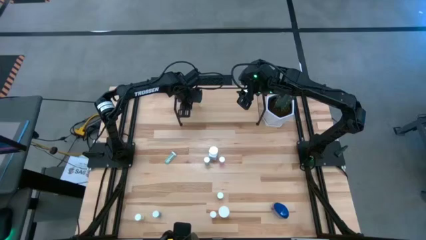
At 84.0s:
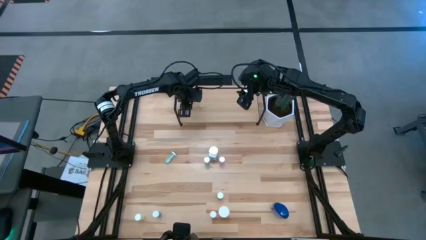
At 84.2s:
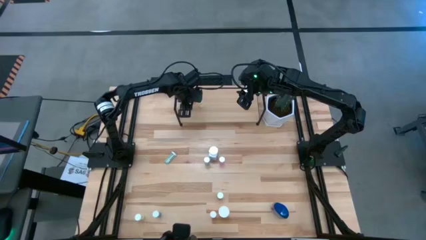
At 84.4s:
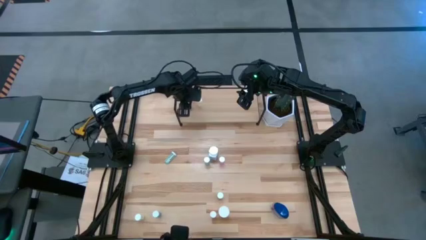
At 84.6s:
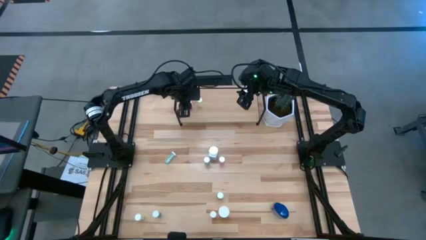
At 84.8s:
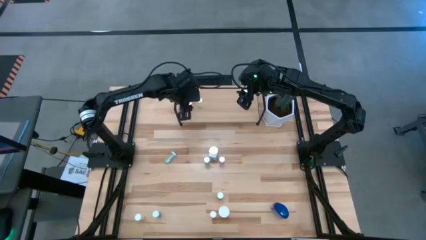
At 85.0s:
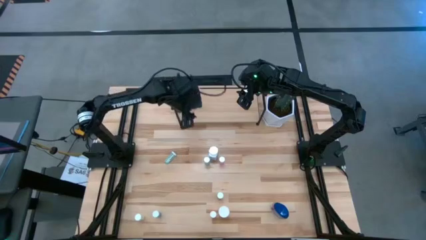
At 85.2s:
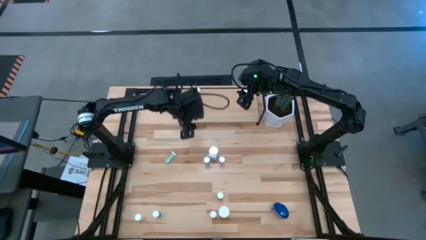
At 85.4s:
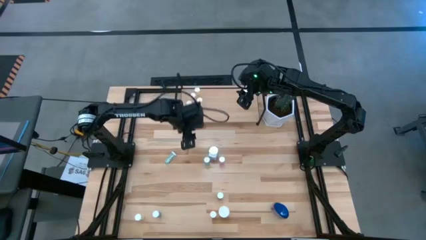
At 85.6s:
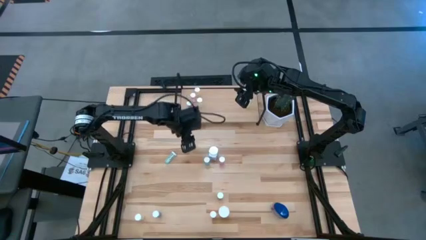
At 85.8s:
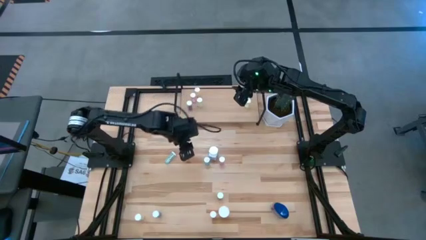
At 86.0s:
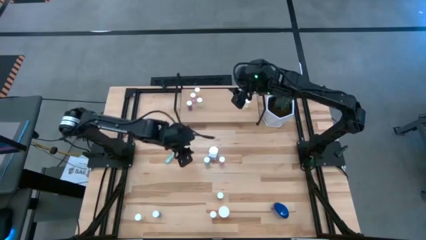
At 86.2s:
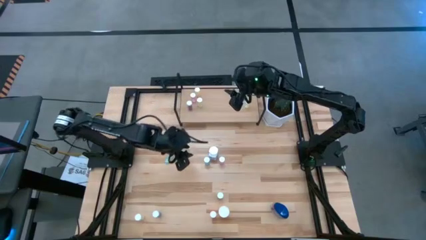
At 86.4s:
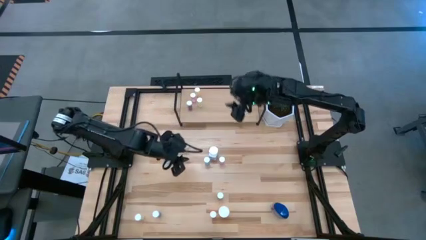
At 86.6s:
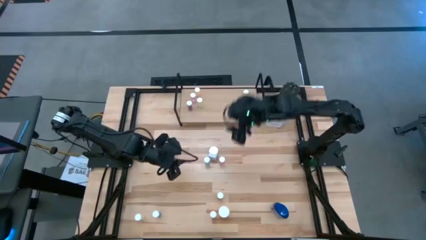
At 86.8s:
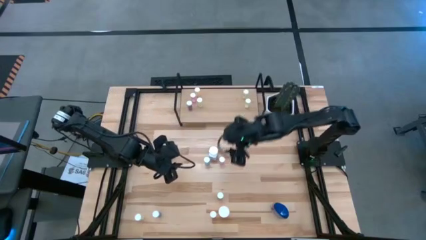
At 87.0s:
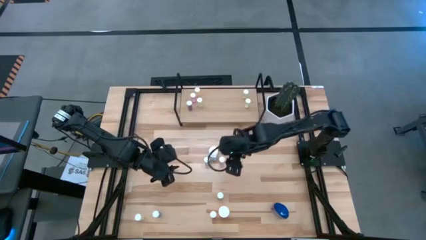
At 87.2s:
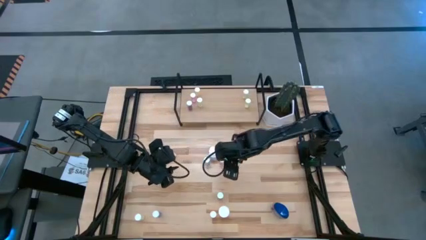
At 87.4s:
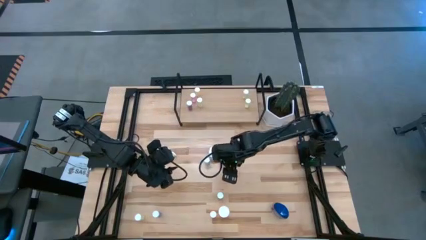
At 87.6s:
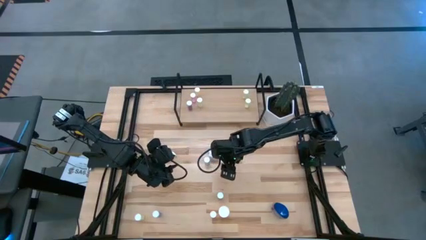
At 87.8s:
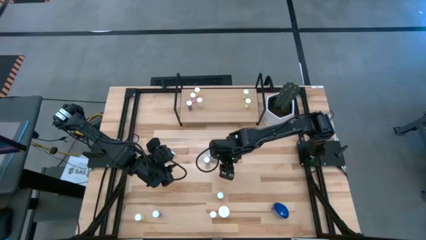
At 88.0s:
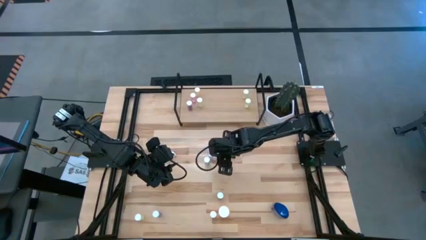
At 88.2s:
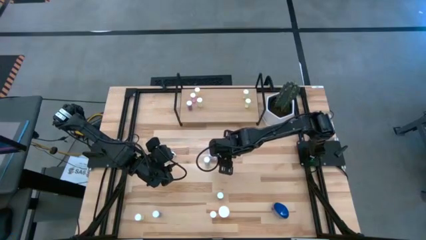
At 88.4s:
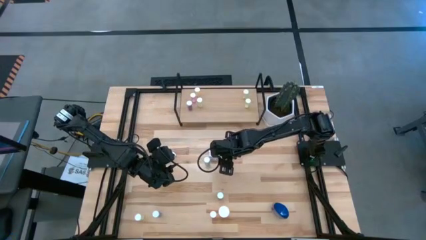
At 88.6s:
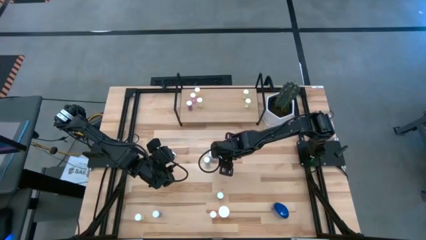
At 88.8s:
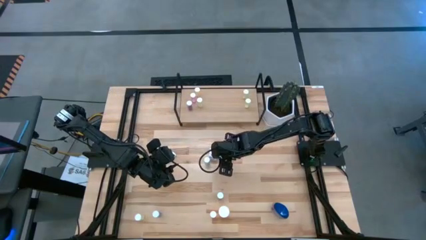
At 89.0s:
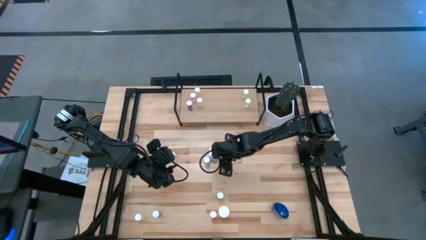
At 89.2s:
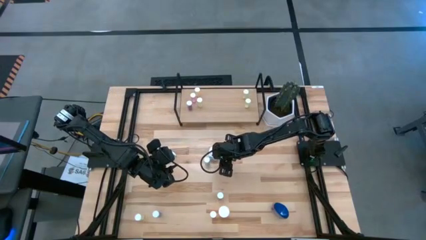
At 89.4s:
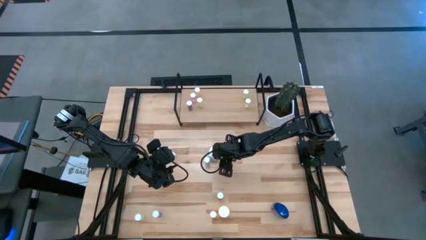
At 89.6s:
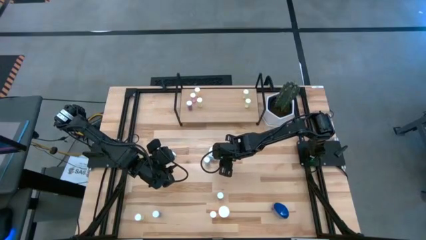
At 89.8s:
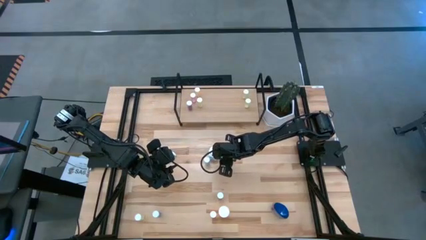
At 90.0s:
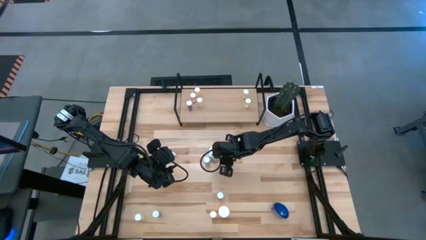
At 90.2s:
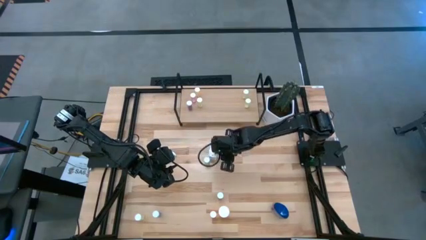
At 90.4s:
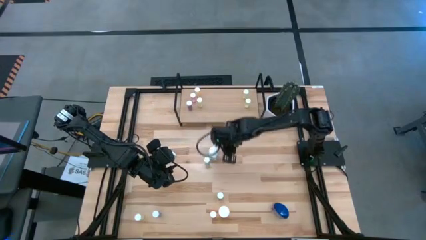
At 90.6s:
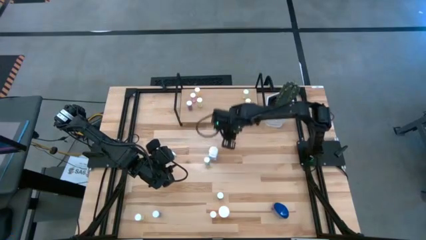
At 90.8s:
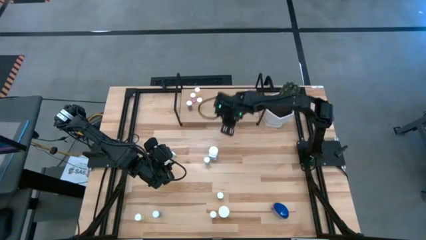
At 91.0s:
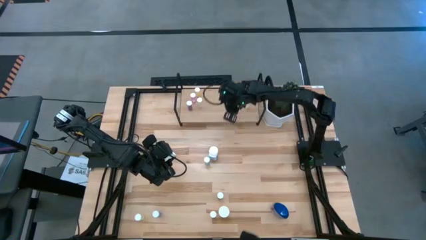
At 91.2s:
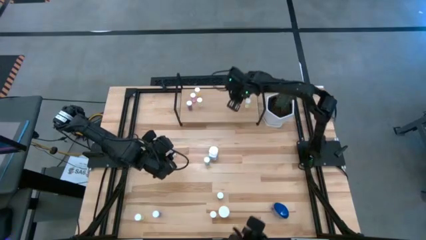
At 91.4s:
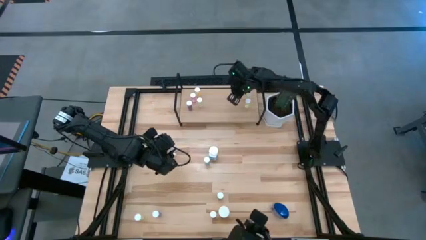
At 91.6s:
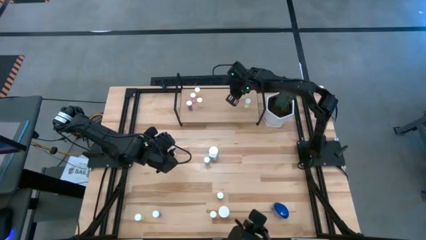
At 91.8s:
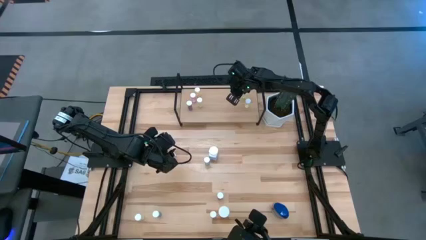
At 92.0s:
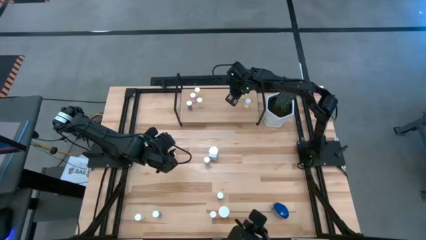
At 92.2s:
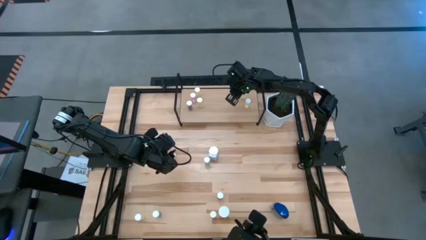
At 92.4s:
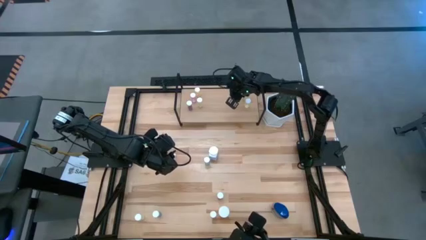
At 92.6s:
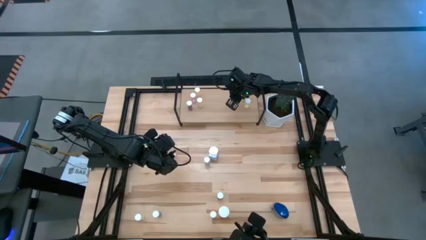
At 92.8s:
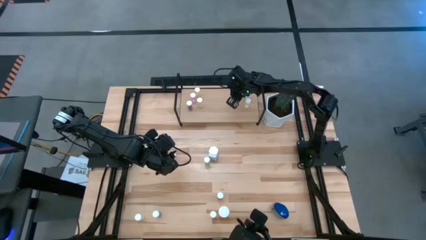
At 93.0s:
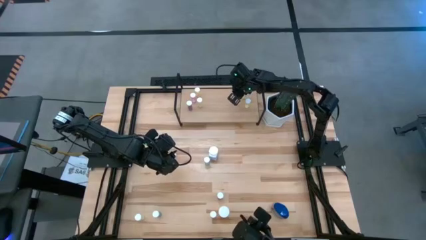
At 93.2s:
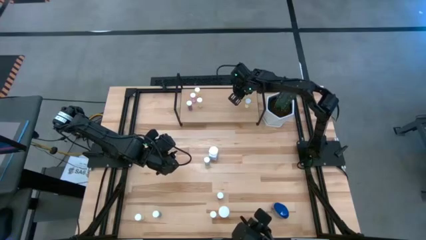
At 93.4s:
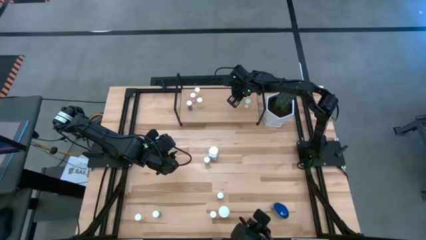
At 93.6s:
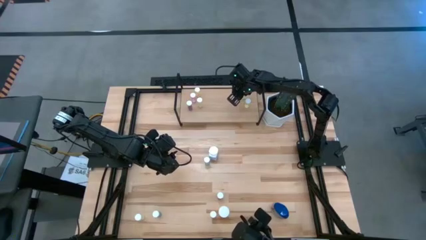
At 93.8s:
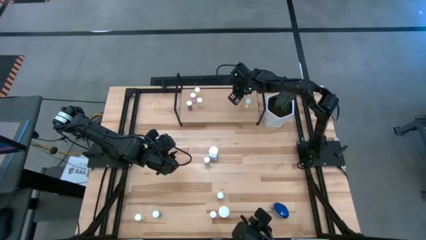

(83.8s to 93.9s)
Task: Pick and place medicine bottles onto shelf by color
Put the pink pill bottle on the shelf
